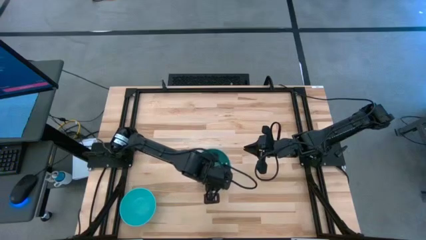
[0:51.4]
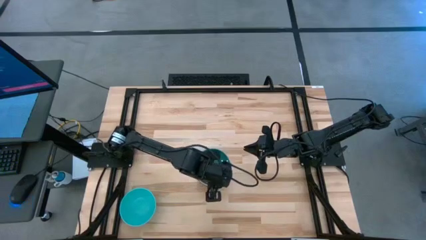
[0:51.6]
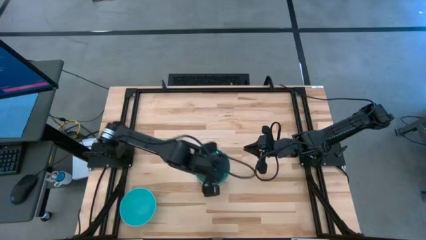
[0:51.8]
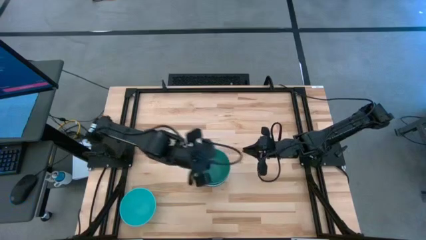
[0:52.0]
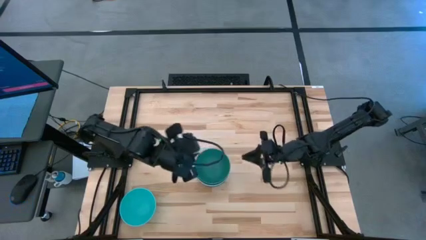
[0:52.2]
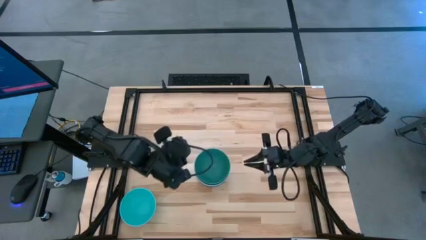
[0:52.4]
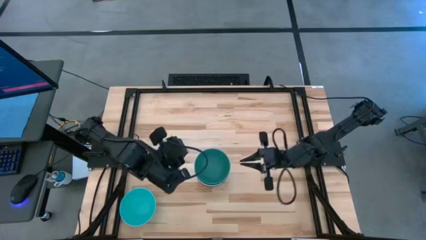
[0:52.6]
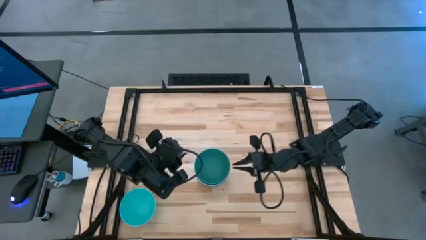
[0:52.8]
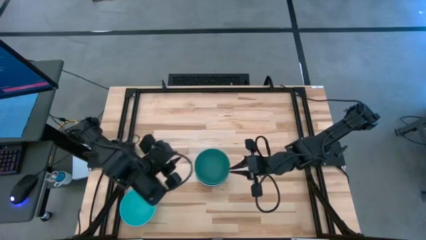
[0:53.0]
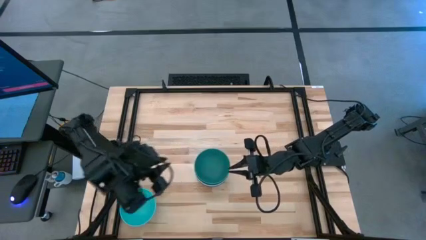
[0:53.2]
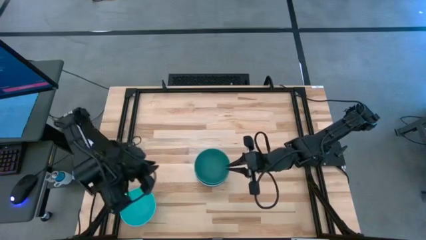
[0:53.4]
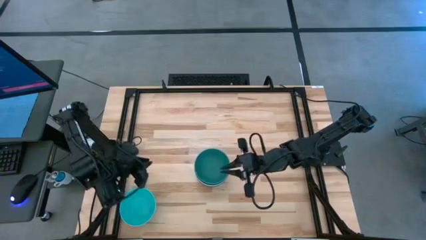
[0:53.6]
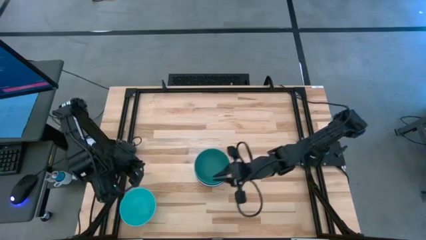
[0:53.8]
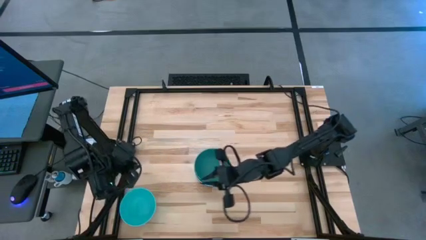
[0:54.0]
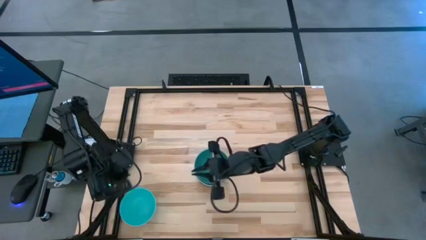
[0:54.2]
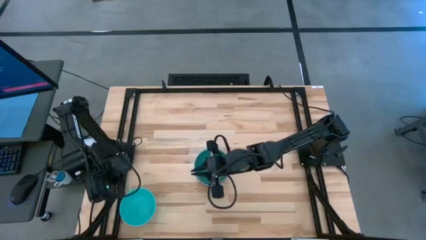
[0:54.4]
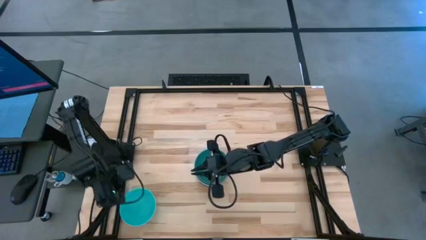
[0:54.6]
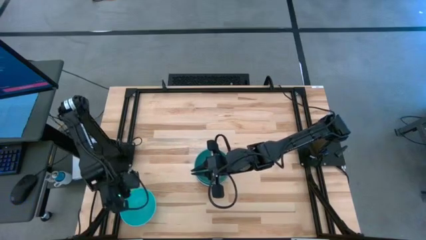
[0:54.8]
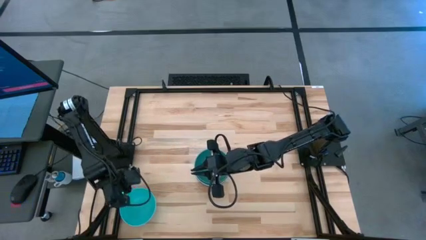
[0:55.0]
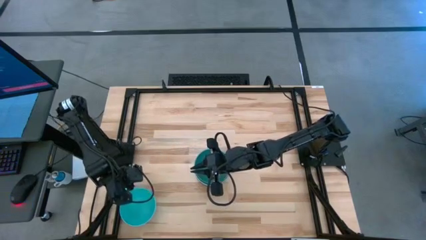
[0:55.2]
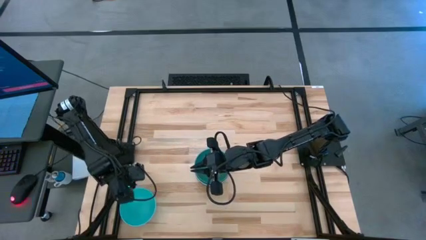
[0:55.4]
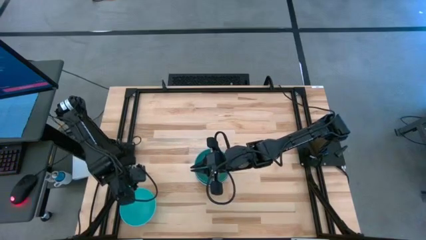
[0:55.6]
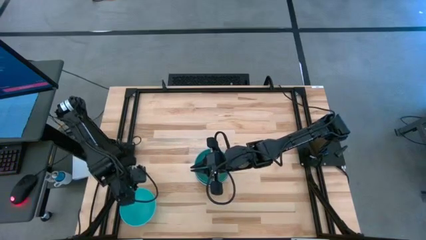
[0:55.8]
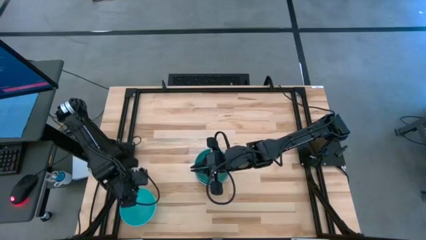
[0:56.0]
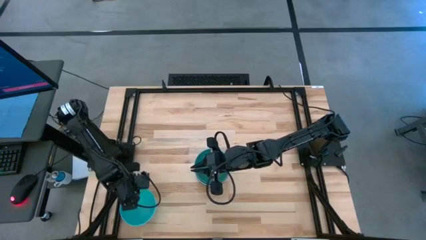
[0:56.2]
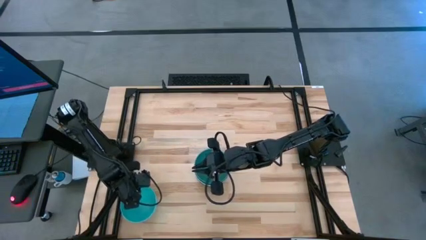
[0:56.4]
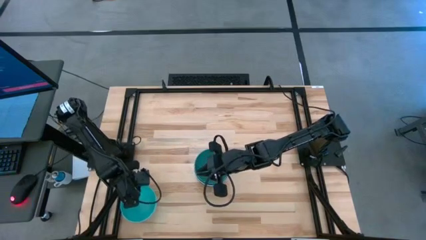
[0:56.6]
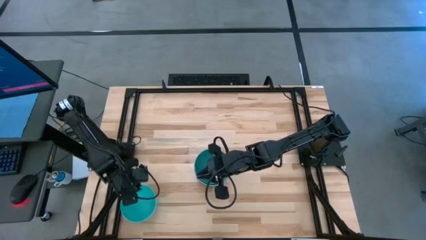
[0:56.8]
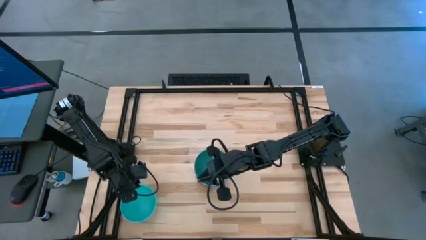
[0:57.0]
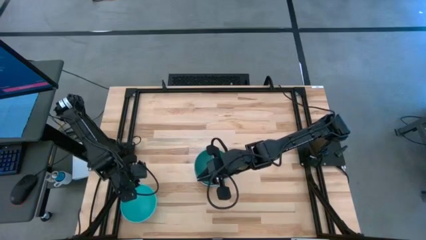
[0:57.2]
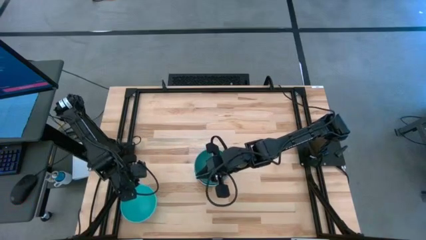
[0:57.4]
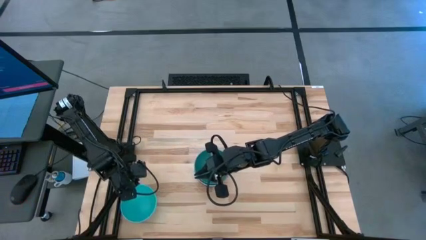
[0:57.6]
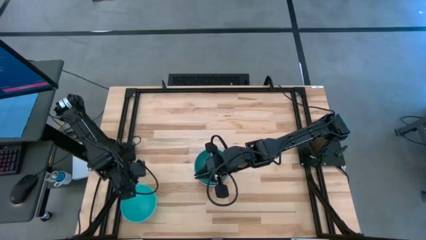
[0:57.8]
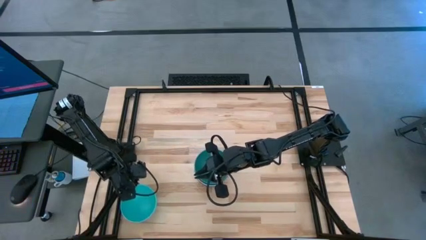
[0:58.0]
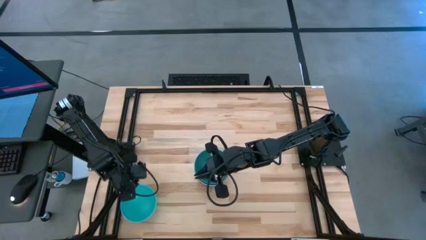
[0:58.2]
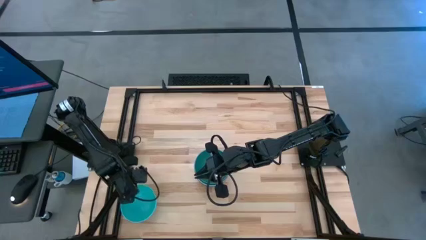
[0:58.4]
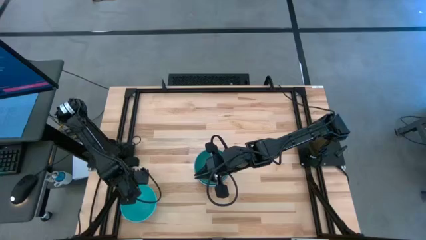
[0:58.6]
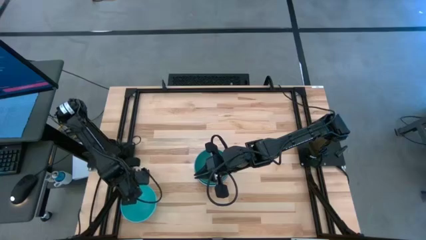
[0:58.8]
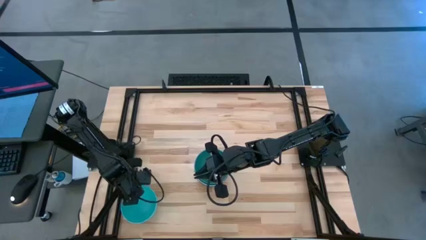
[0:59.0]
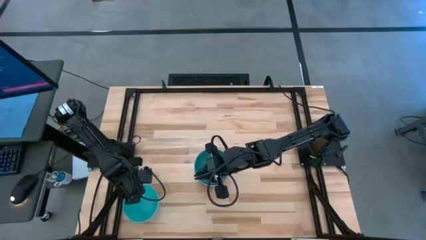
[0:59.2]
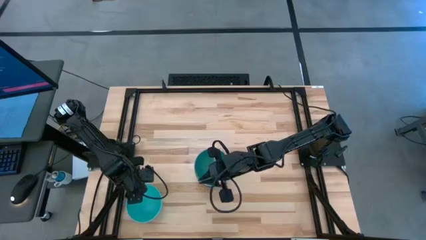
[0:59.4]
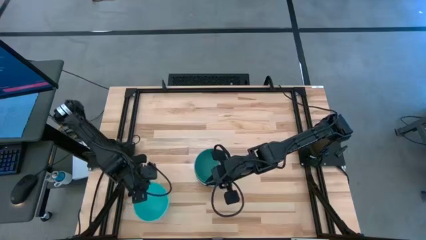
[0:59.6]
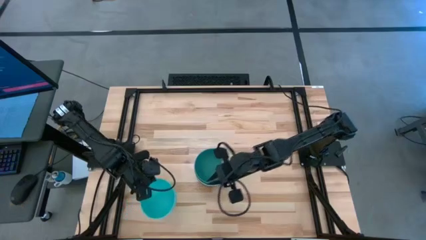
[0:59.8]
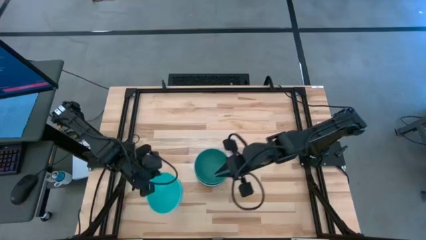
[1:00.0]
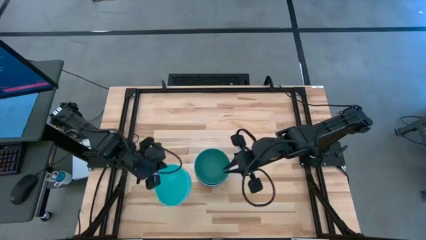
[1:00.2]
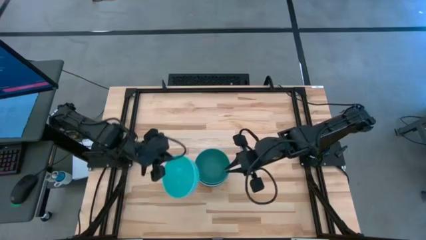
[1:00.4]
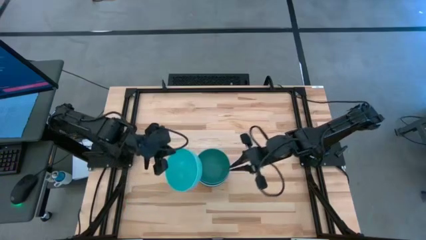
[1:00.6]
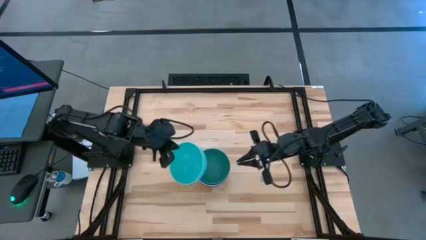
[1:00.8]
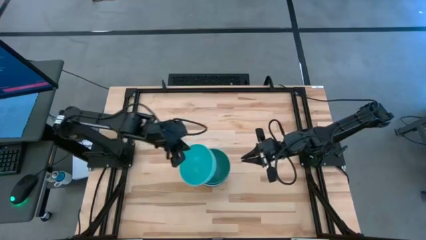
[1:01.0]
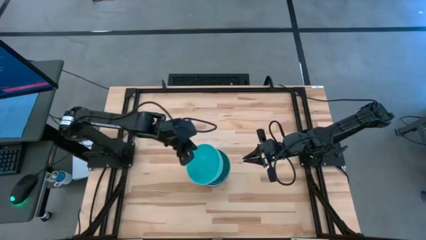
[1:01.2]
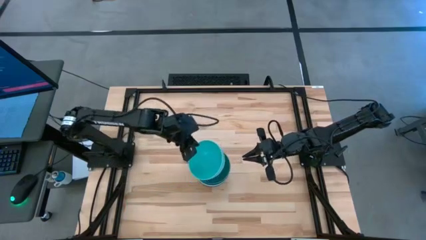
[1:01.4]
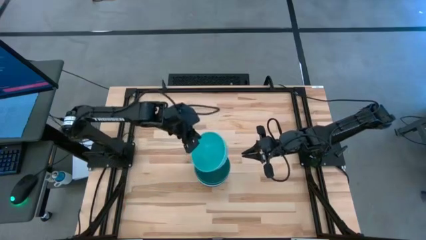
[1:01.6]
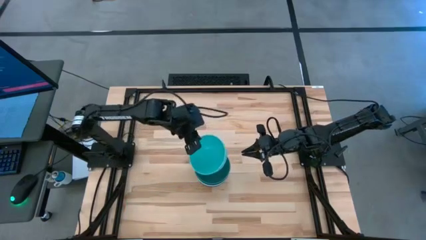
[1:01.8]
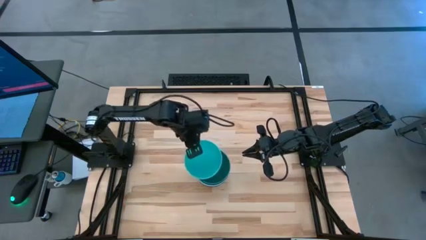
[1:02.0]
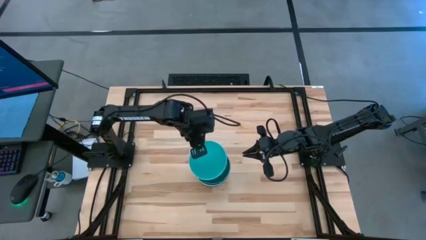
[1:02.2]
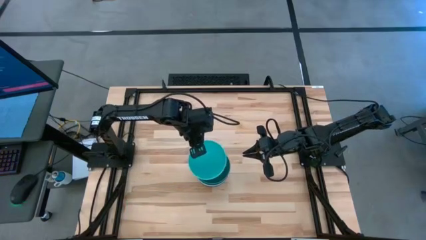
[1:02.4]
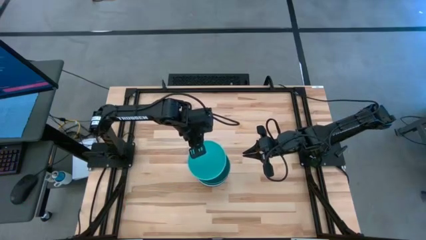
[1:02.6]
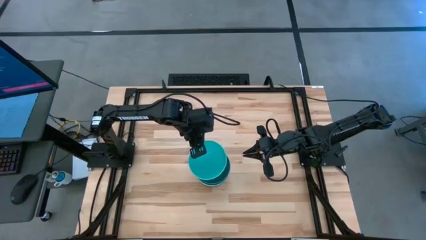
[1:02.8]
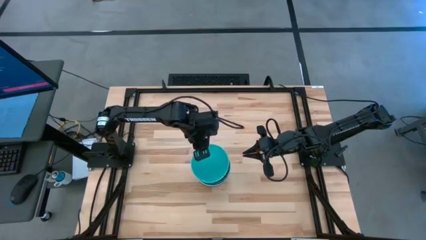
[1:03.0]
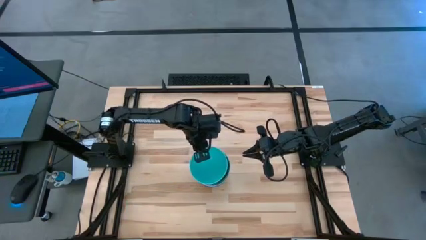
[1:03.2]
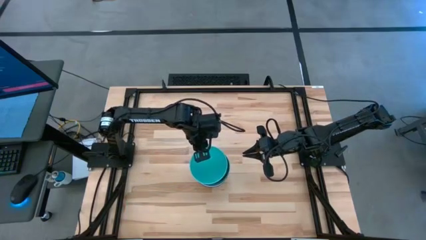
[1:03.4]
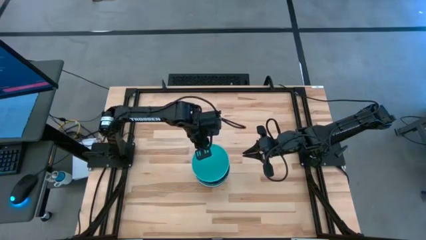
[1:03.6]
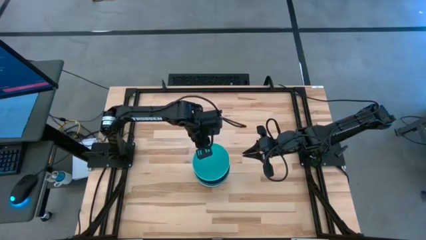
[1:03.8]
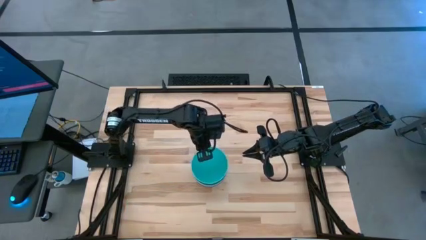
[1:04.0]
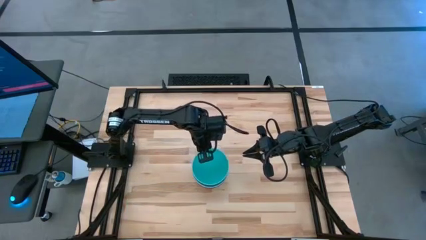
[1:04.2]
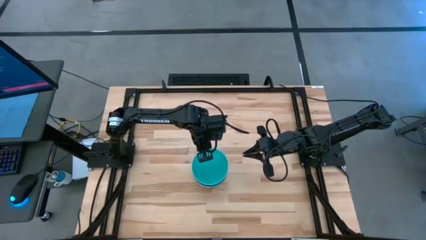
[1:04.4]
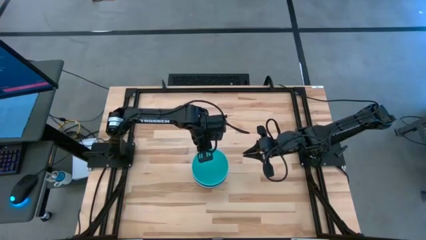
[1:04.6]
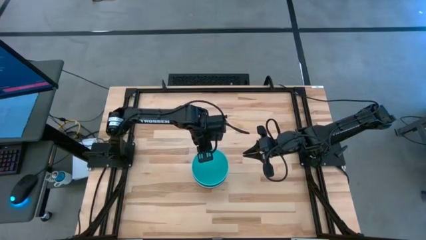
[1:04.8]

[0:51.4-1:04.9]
Task: Nest bowls inside each other
Stack the light blue bowl on top of the green bowl
